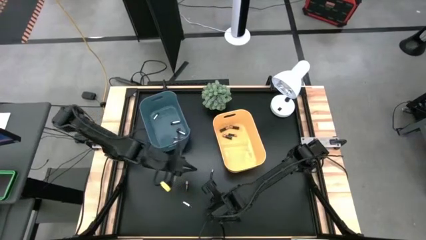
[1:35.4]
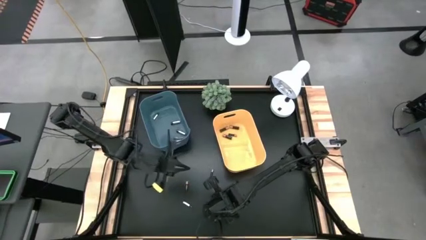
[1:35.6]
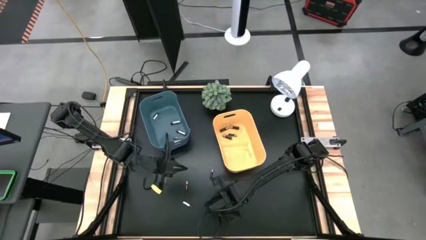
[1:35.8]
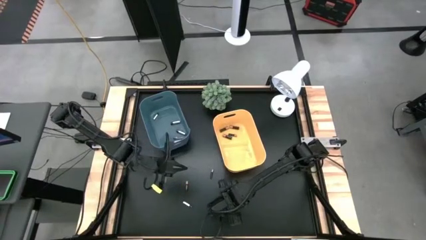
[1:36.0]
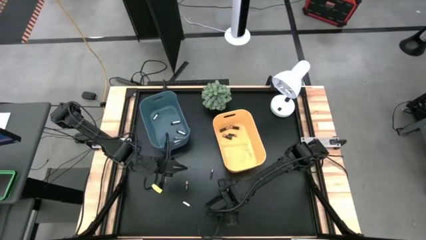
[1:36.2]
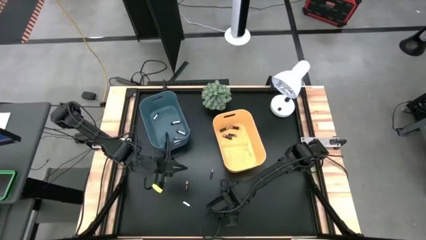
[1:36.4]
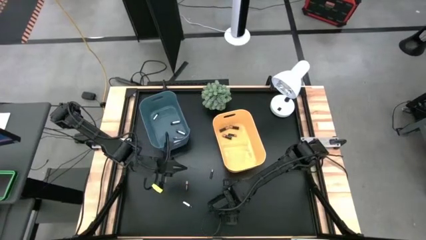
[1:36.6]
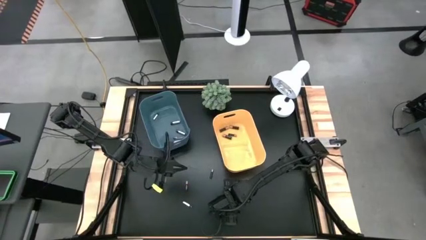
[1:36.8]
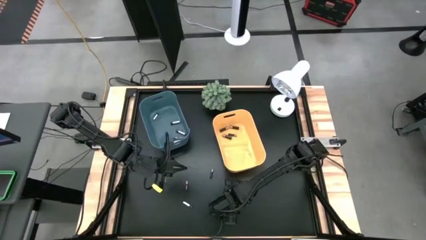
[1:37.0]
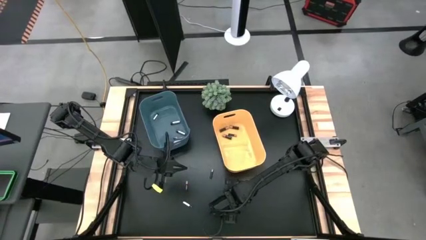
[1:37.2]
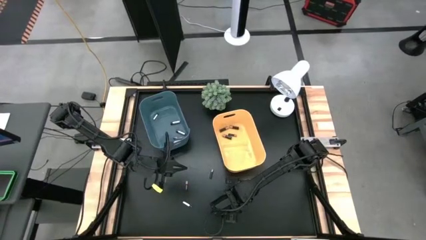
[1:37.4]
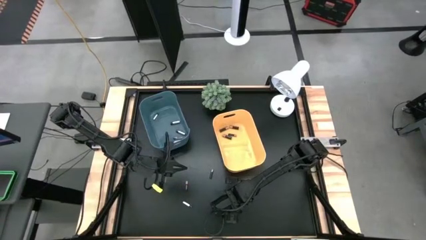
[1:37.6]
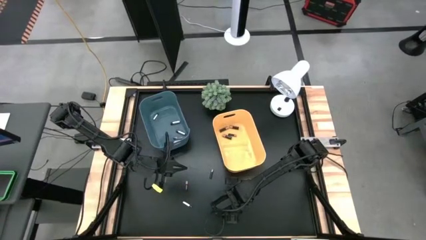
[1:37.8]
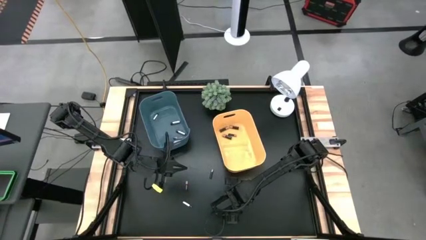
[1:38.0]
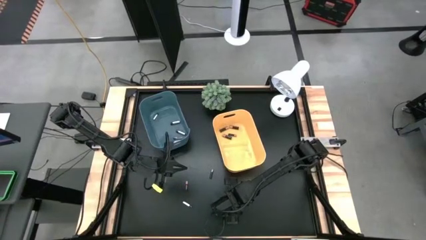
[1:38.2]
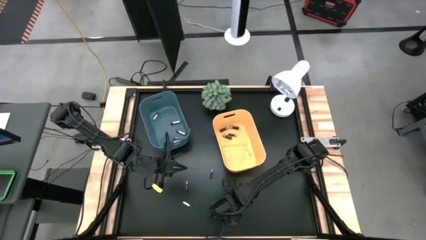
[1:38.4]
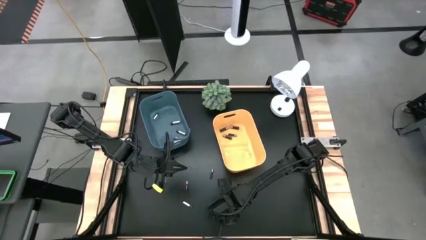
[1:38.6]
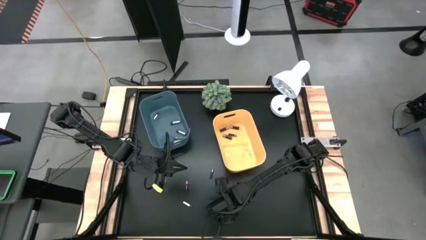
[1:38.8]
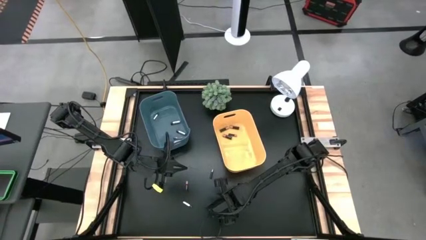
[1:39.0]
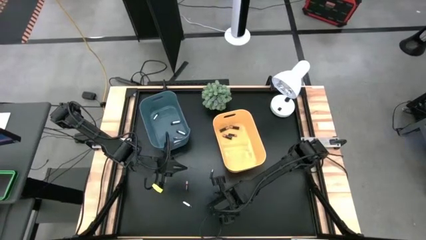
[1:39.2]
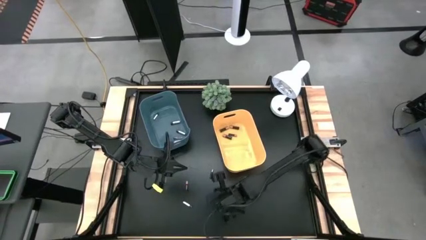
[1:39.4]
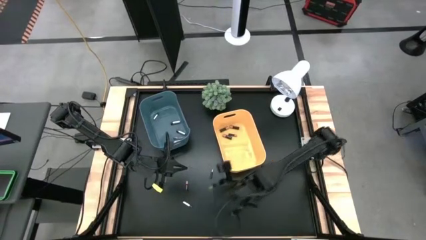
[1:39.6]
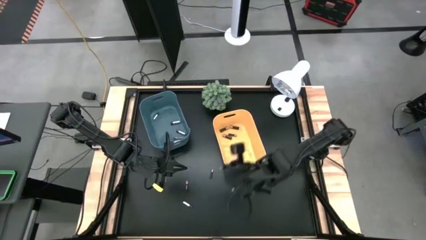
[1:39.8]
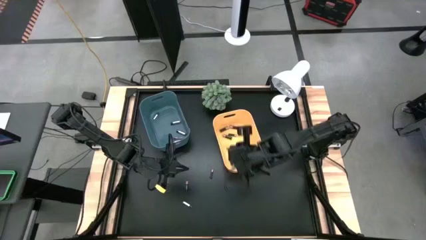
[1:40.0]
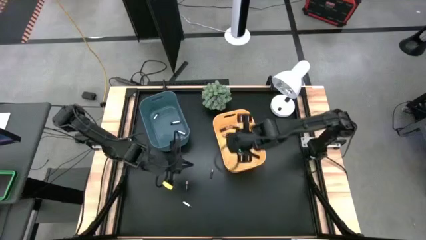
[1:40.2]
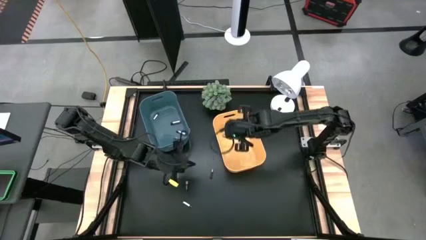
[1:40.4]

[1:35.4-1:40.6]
Task: Sort batteries
Put the black battery into the yellow bin

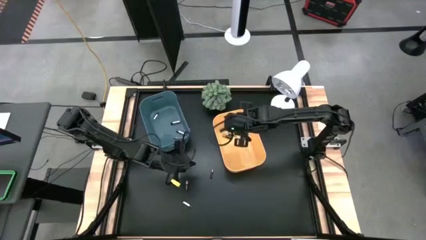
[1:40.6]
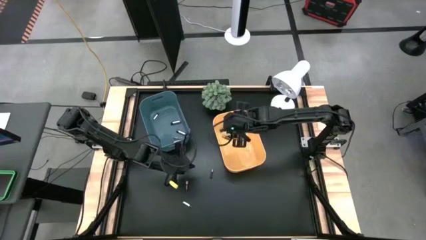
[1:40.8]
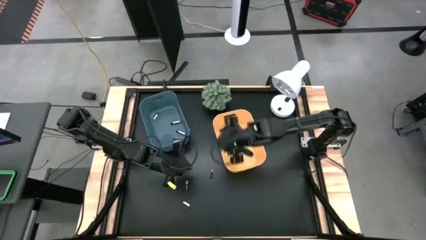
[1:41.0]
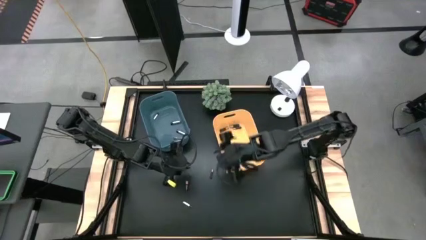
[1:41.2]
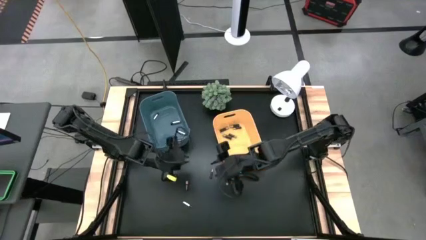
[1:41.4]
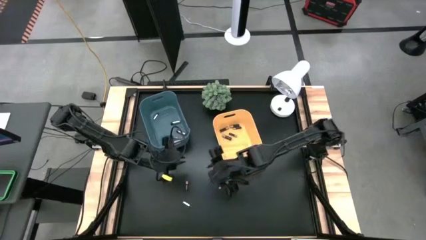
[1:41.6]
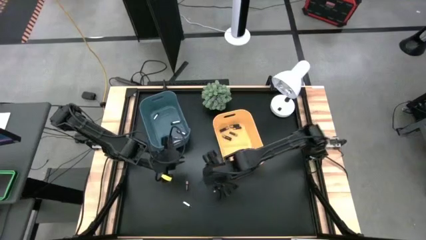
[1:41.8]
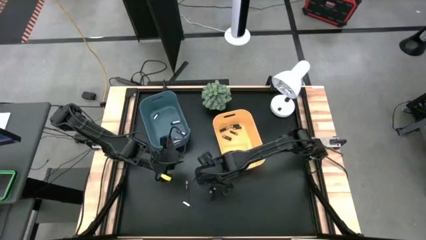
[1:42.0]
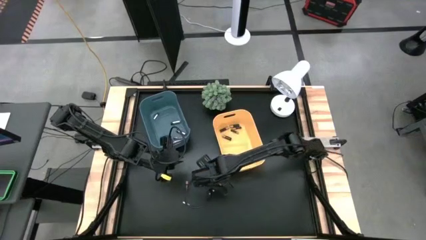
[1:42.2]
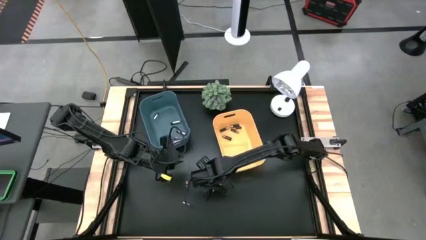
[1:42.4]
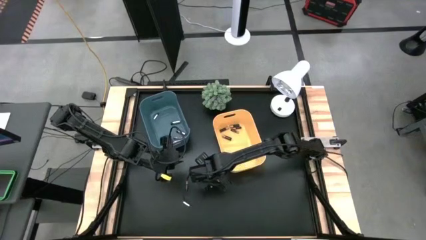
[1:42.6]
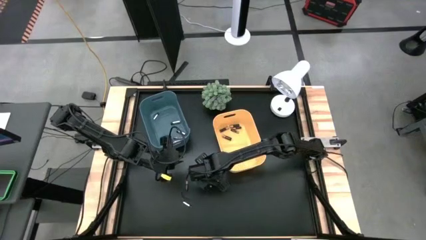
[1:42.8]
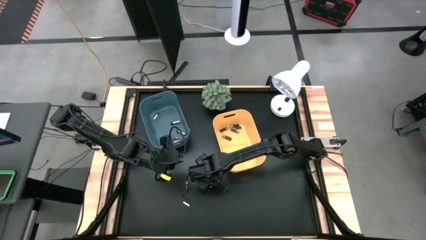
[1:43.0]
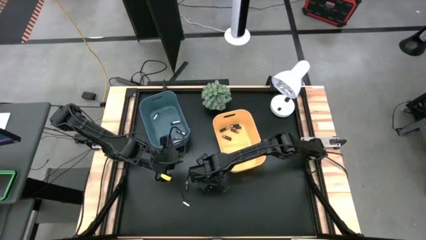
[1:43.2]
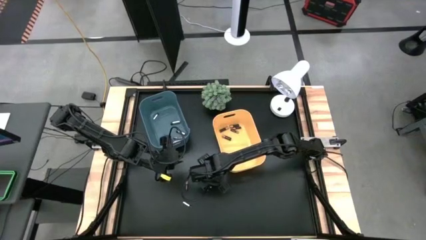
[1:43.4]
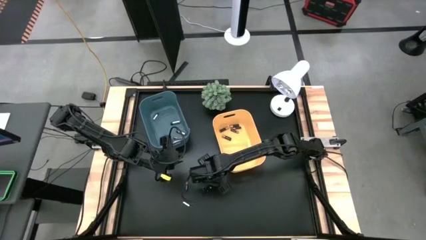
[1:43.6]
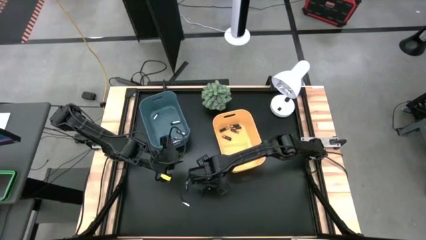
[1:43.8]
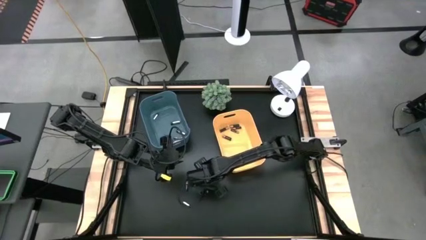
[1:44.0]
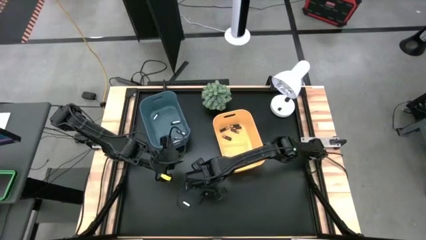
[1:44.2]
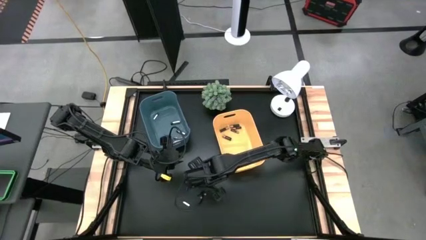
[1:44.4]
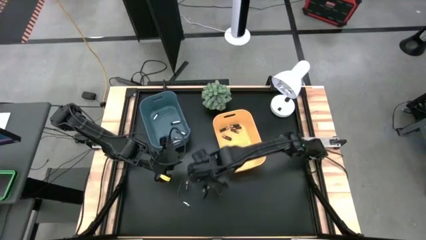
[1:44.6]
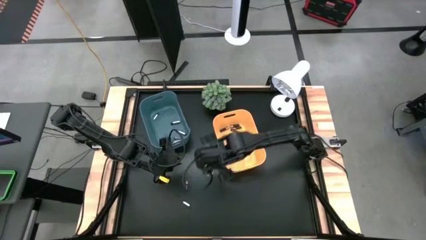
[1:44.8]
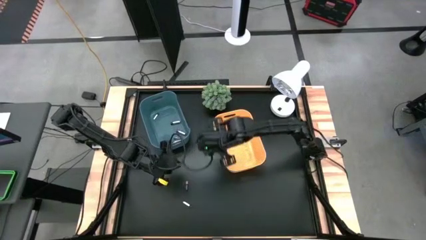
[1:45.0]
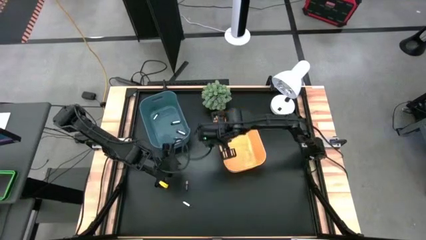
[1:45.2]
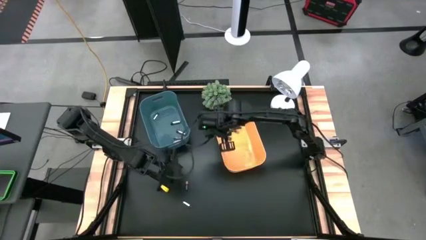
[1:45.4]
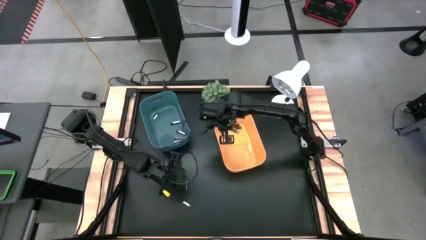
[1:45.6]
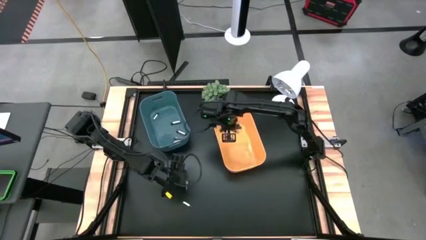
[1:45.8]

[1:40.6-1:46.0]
Put the black battery into the yellow bin

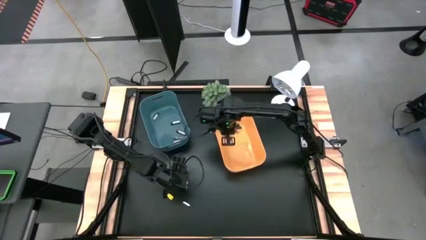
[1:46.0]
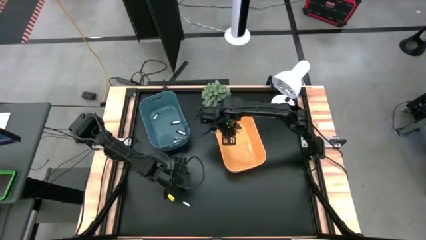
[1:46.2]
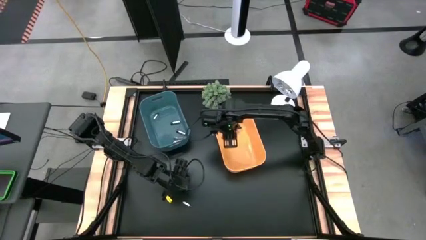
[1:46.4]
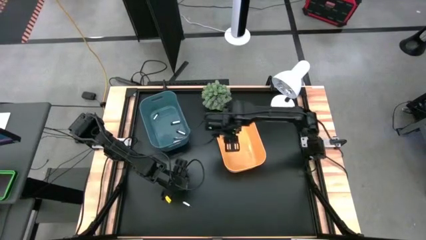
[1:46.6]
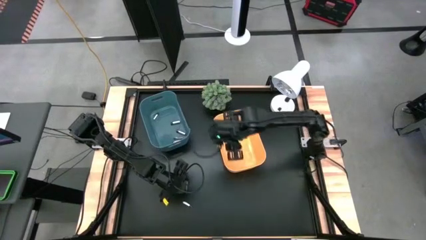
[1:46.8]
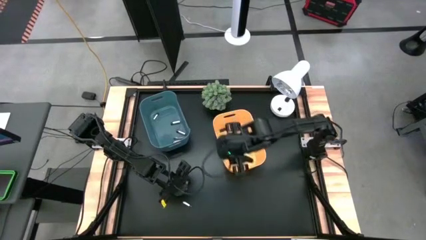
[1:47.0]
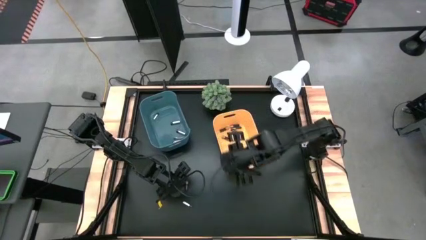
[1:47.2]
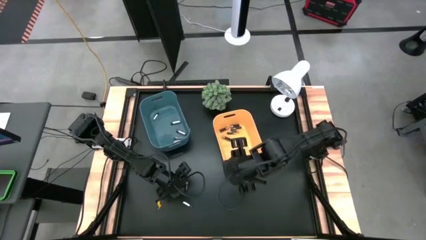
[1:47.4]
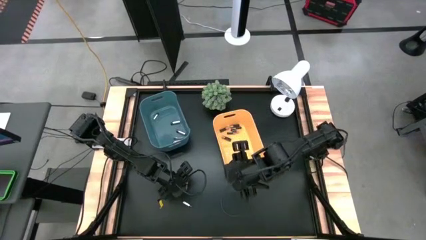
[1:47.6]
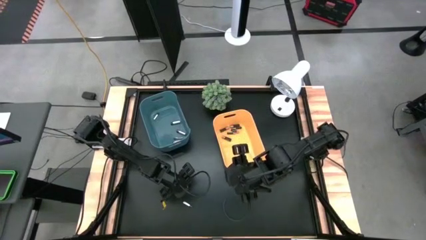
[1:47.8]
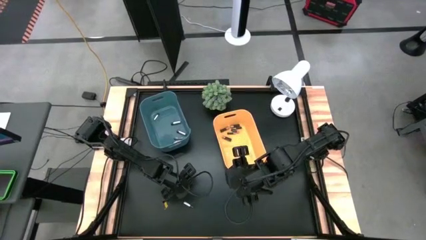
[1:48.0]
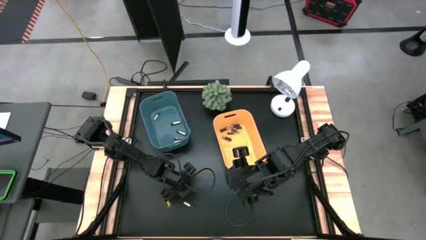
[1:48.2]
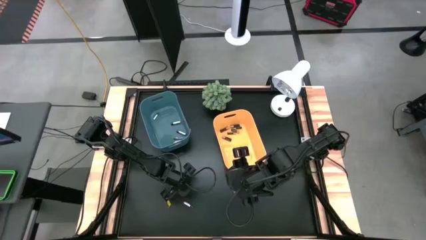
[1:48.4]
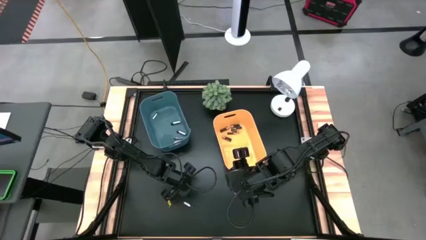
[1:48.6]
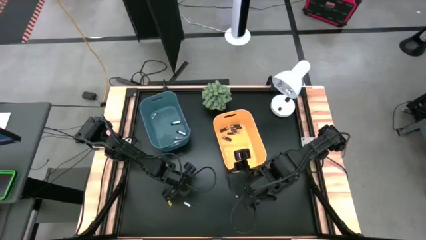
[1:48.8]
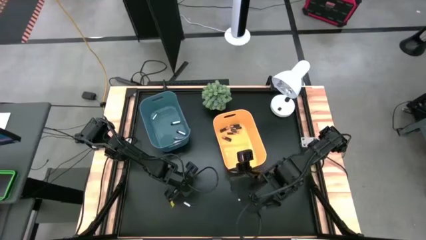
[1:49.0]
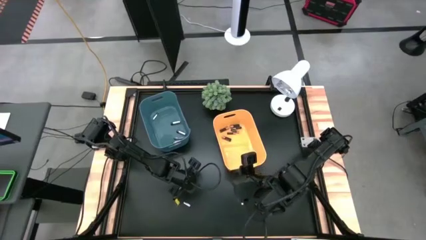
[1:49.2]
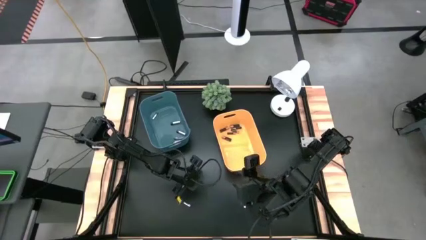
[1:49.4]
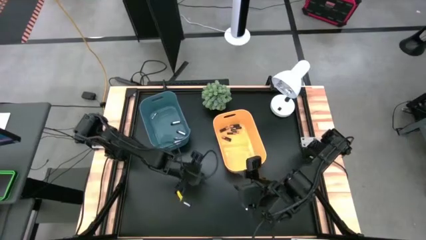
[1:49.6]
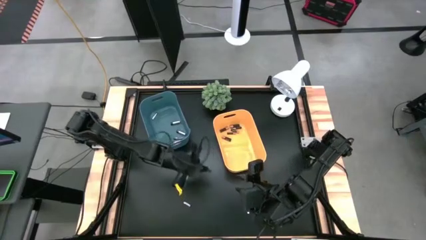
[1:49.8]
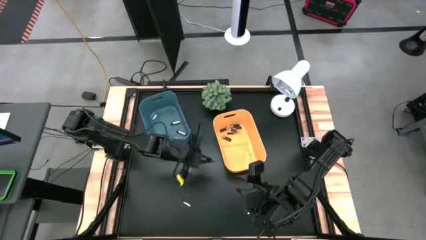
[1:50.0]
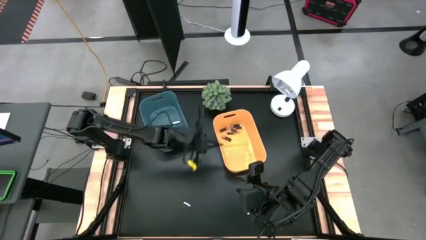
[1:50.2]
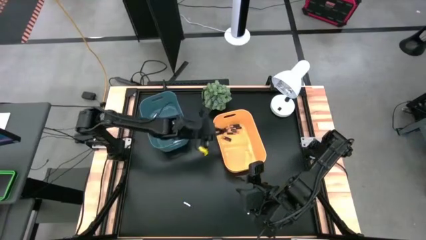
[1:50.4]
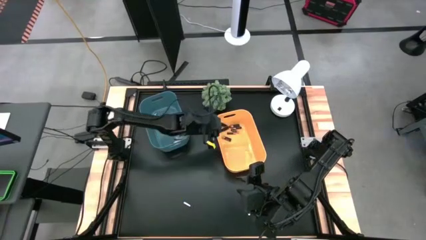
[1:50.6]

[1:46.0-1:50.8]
Put the black battery into the yellow bin

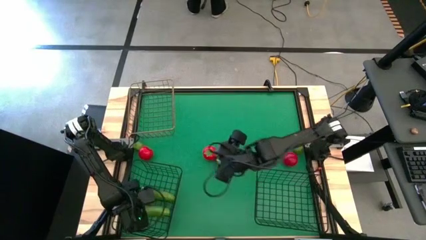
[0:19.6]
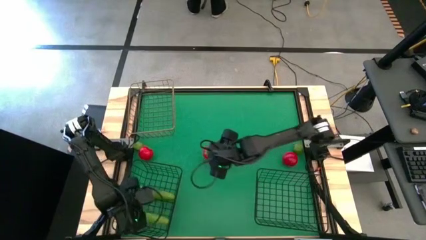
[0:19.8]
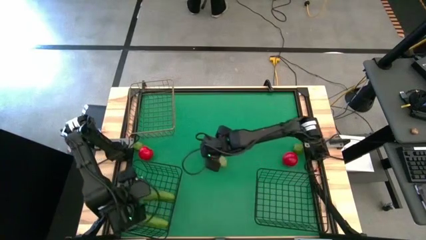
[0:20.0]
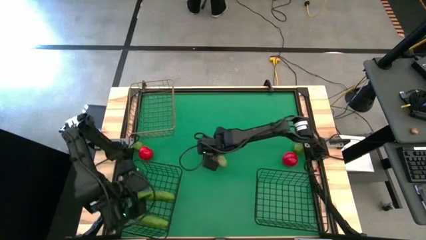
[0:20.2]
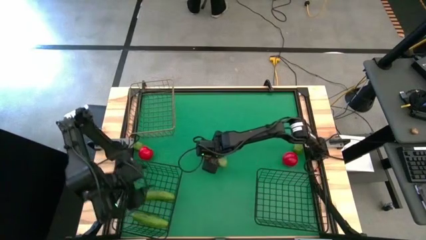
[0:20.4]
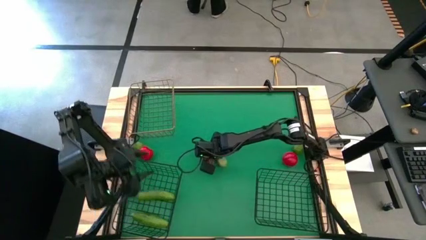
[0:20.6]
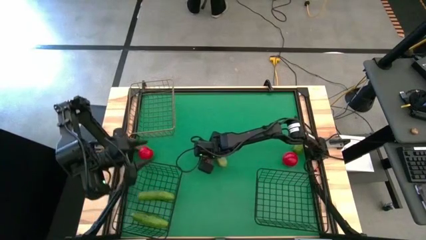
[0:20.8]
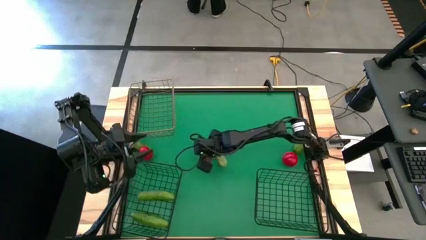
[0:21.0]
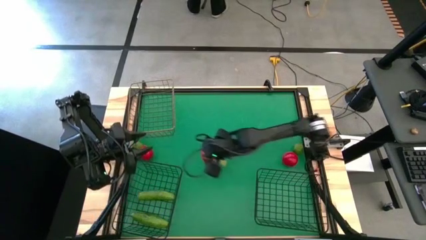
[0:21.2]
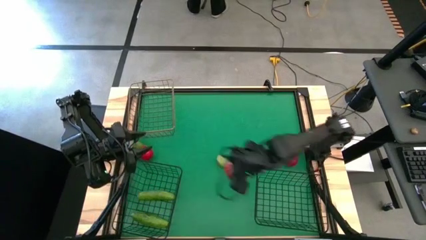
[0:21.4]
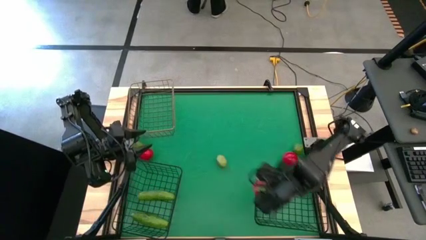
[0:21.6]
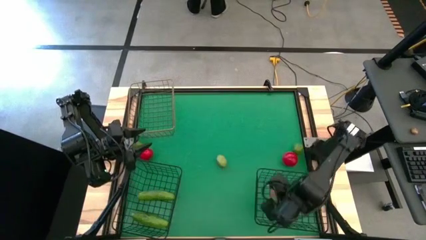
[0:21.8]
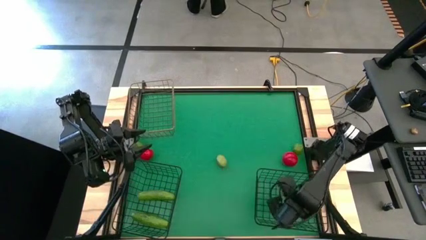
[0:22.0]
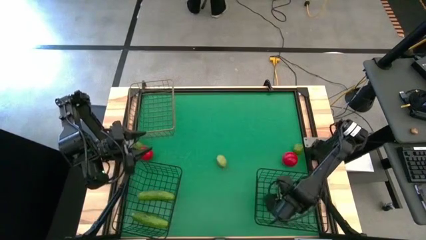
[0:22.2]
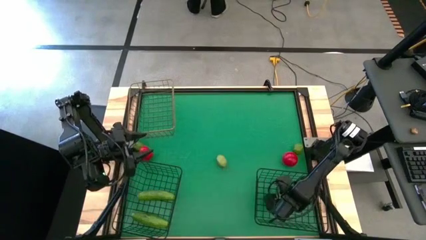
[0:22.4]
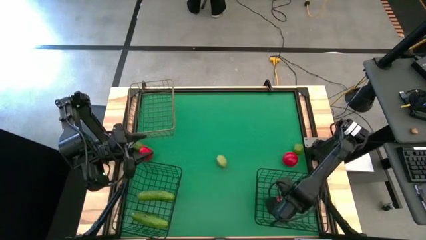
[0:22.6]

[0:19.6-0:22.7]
Task: Sort produce into baskets
Put the center tomato into the bottom right wire basket
